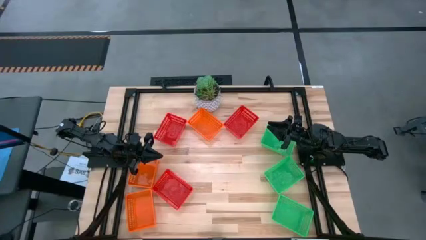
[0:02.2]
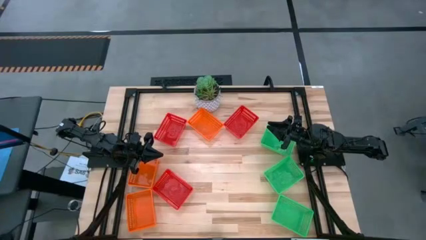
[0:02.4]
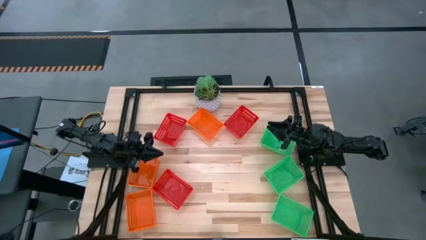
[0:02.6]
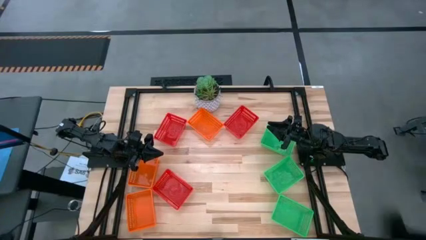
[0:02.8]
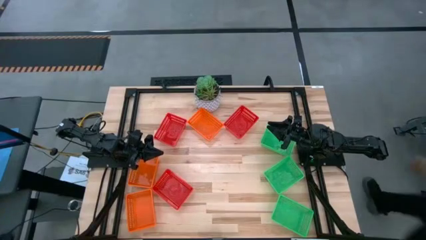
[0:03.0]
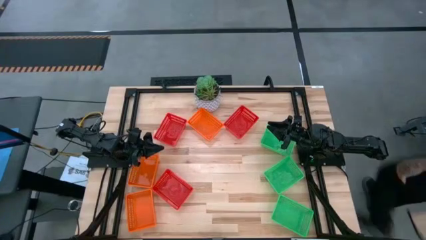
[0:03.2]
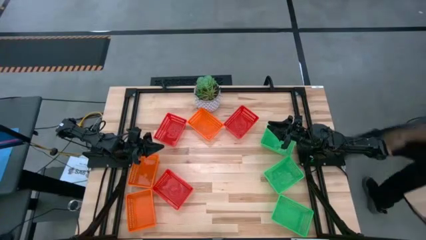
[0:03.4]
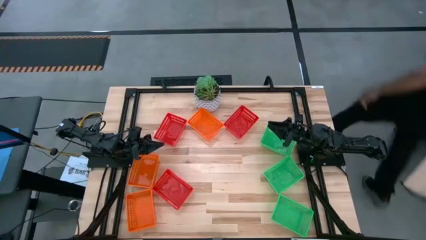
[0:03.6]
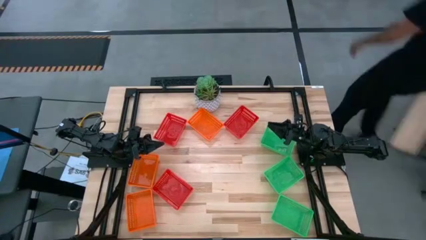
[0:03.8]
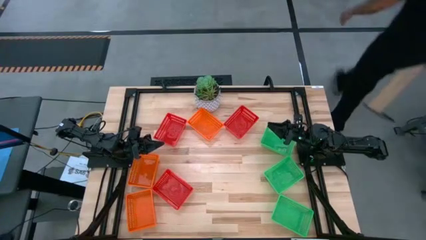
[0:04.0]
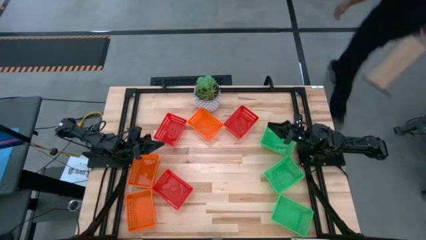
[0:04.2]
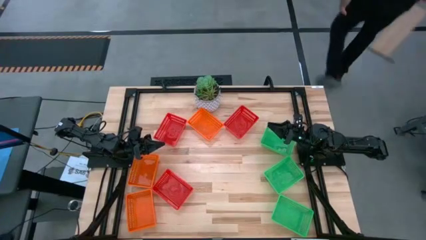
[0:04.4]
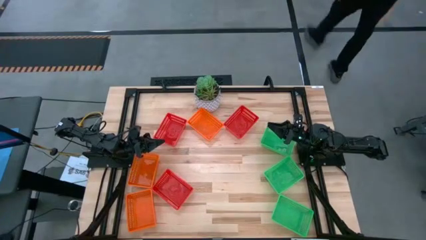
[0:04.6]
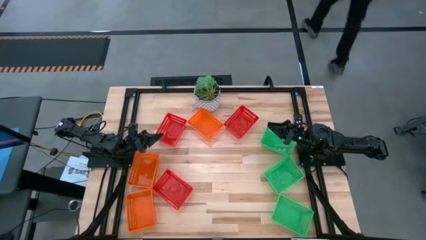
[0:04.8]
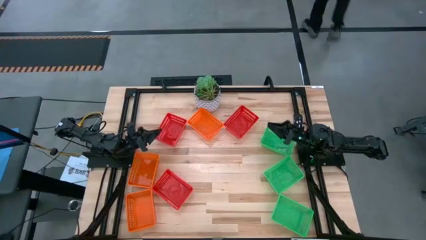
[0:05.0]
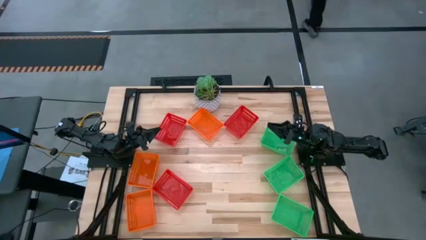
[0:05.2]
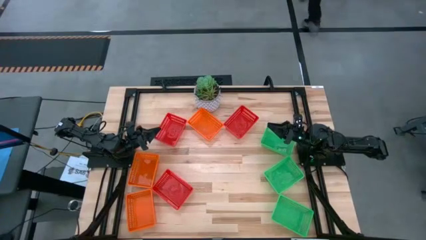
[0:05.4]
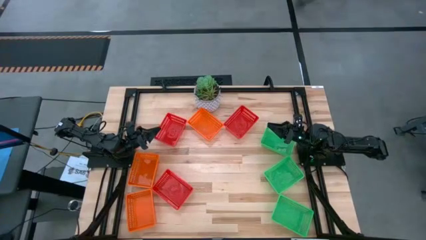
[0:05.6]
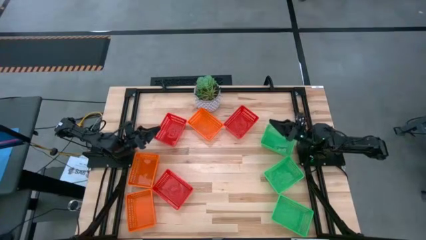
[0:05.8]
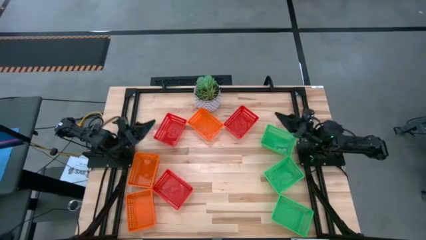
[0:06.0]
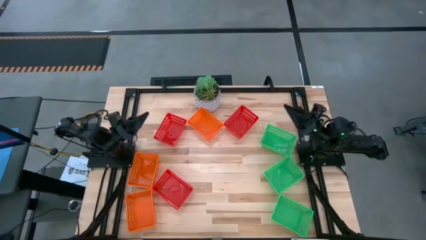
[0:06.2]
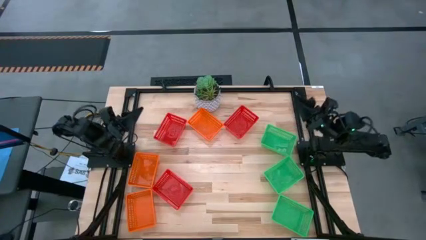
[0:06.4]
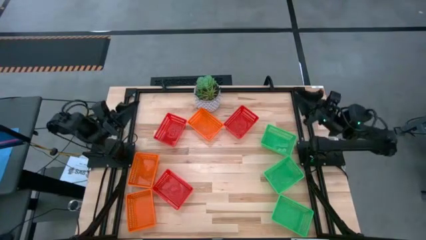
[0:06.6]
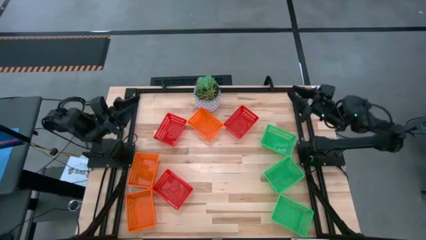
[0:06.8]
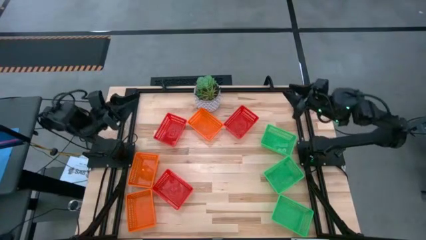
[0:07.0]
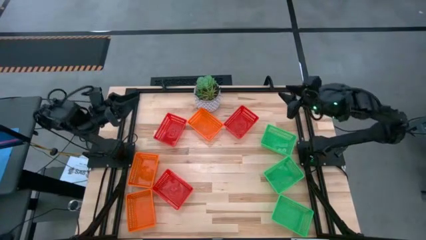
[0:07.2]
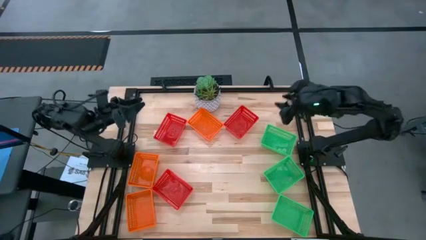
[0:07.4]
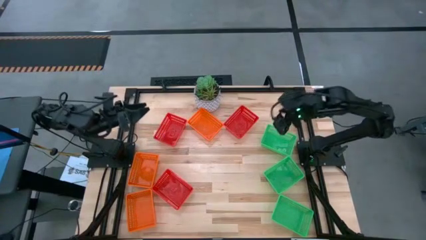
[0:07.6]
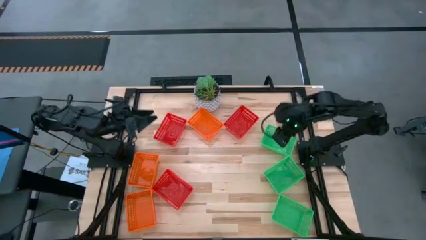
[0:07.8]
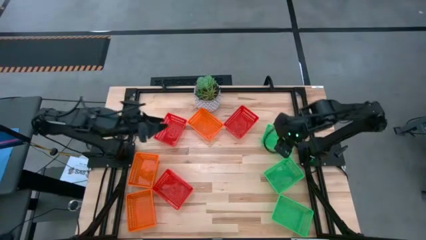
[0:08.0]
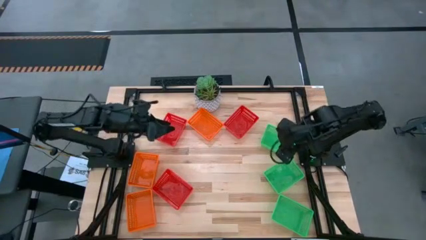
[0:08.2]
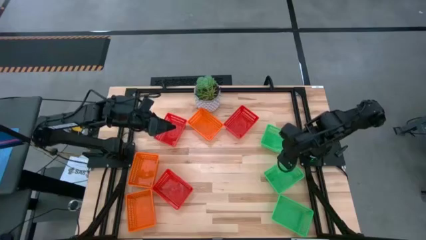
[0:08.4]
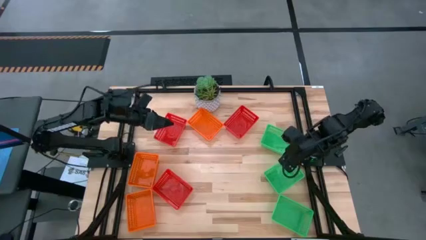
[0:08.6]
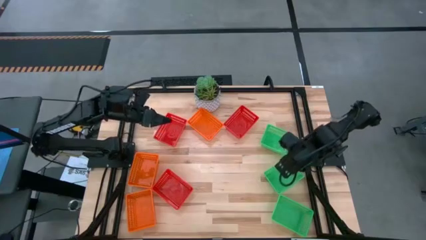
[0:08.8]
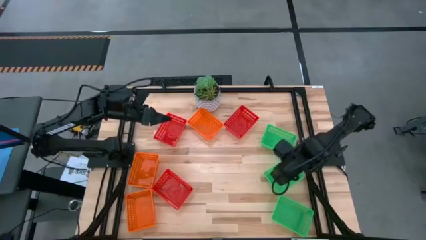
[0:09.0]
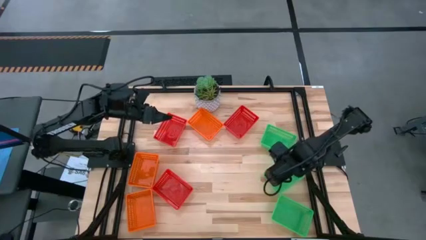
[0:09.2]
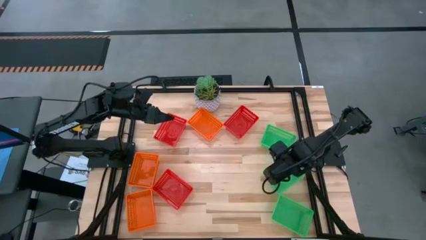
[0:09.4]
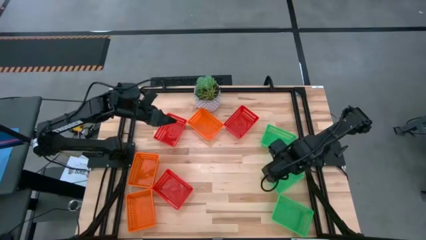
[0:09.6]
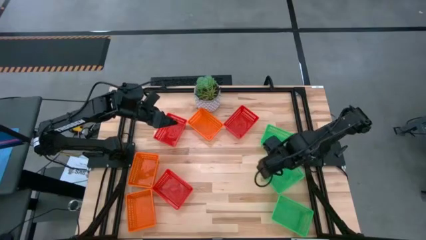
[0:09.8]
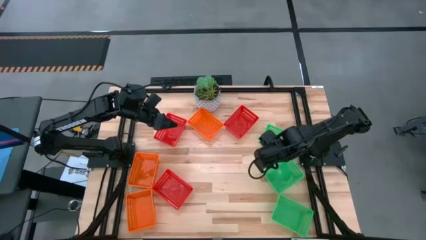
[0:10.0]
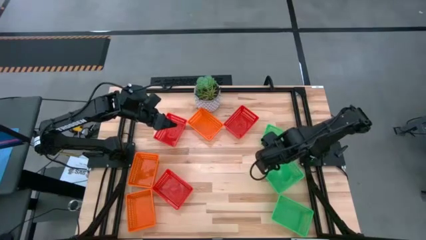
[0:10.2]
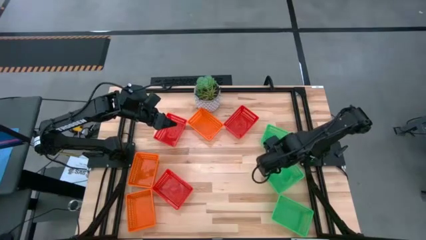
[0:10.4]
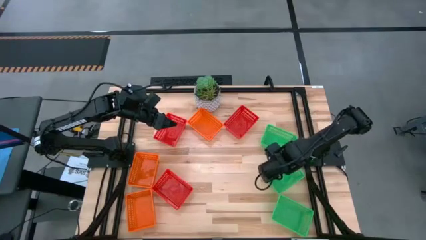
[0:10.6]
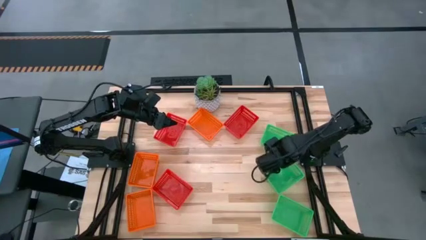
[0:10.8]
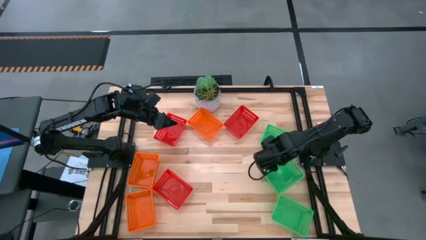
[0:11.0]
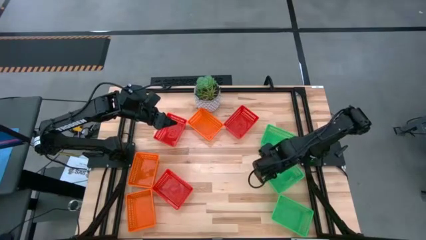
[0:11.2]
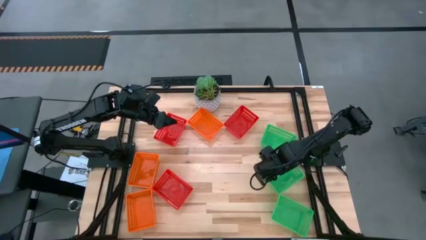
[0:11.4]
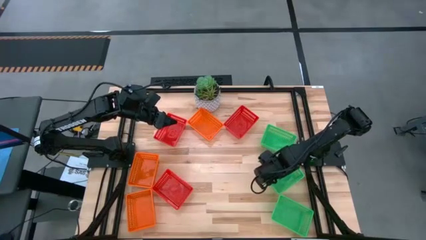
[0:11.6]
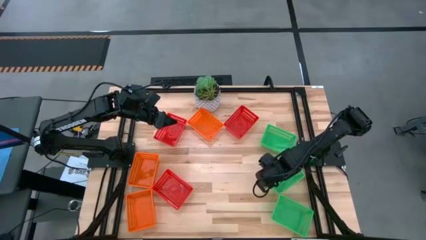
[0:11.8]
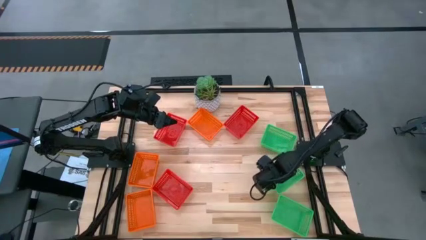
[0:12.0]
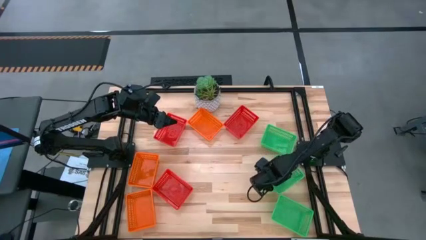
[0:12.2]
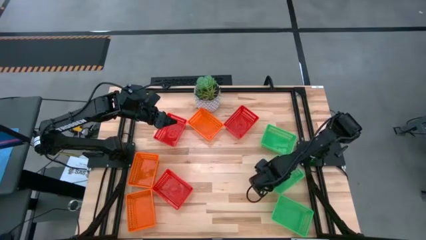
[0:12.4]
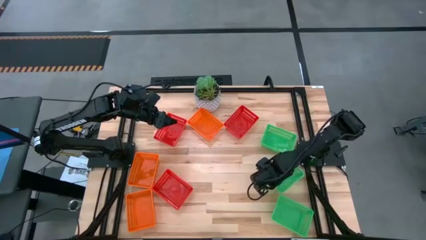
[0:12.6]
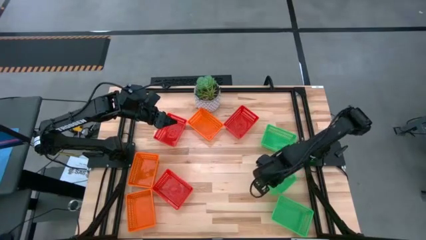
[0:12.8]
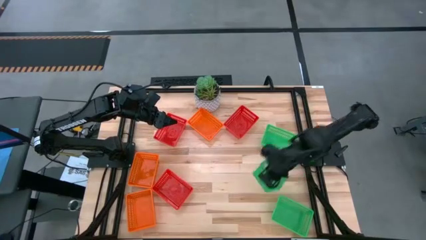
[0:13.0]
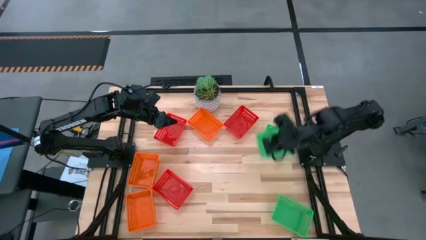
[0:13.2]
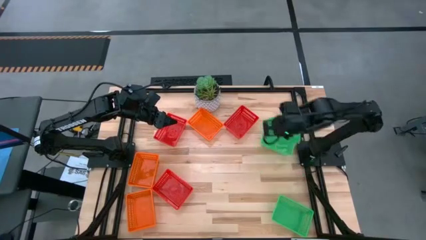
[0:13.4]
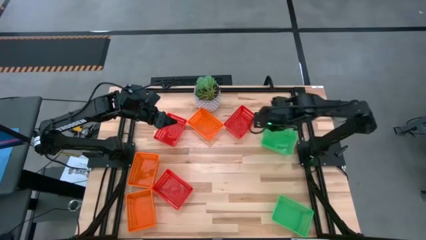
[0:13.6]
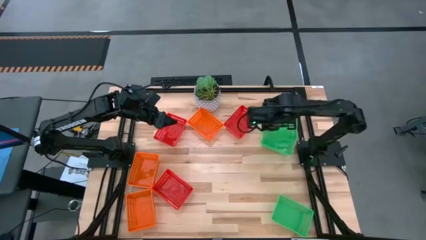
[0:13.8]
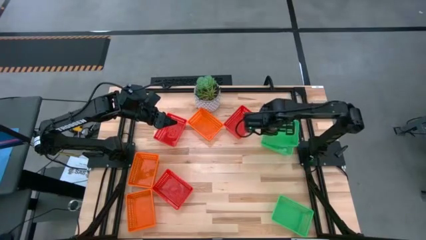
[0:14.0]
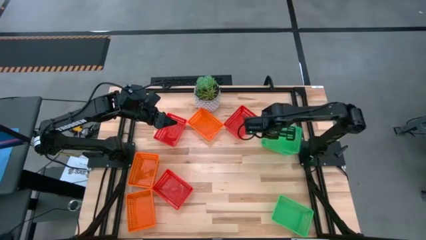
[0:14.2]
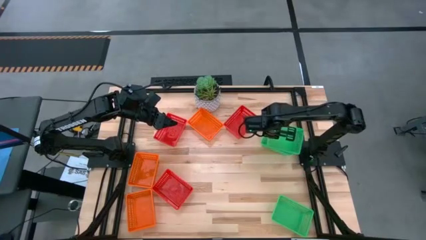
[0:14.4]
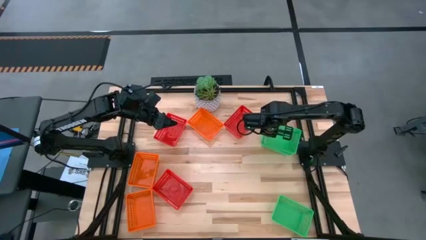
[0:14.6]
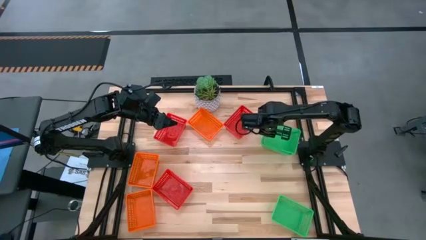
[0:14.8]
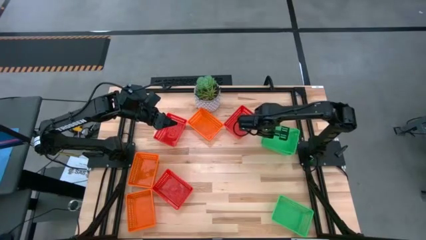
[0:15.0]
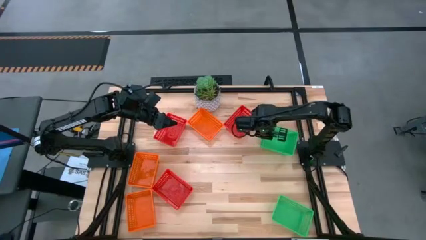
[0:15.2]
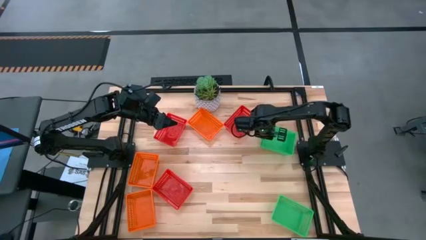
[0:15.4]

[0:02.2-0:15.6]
Stack the middle green bin into the top green bin
